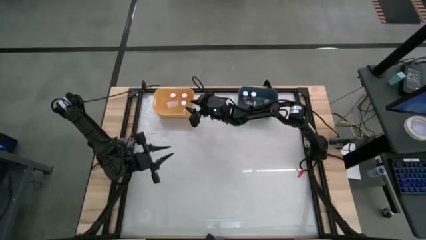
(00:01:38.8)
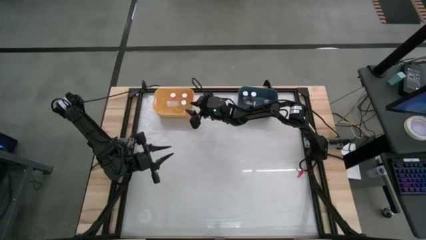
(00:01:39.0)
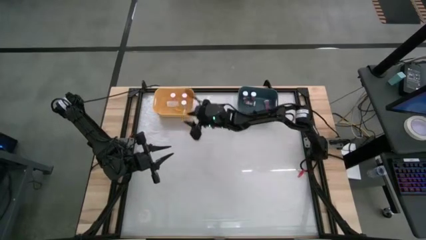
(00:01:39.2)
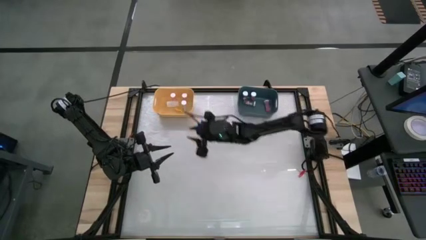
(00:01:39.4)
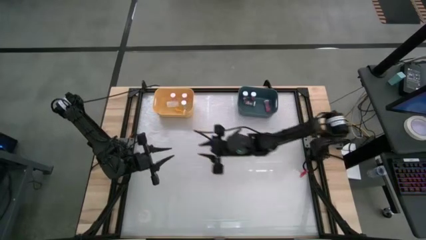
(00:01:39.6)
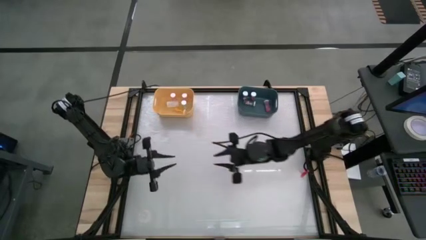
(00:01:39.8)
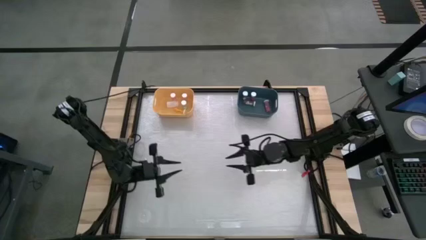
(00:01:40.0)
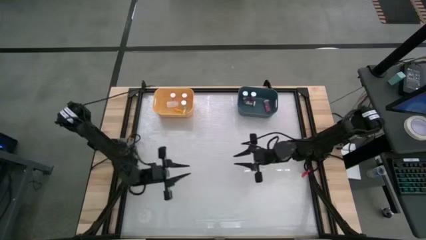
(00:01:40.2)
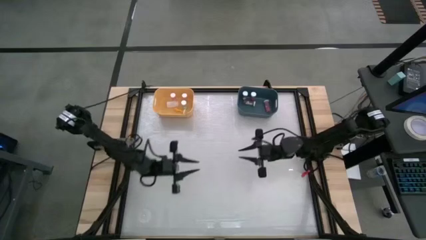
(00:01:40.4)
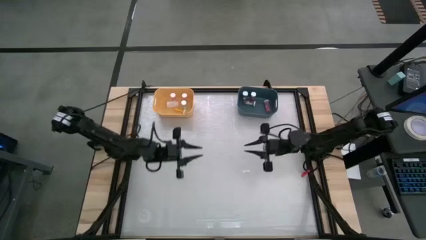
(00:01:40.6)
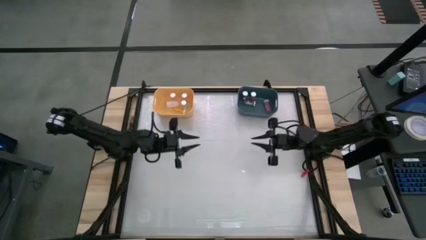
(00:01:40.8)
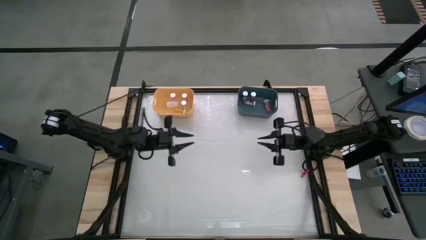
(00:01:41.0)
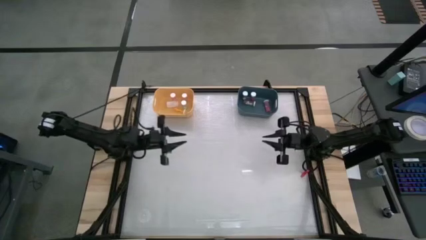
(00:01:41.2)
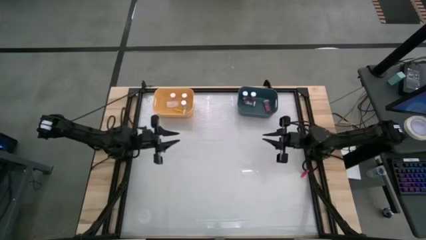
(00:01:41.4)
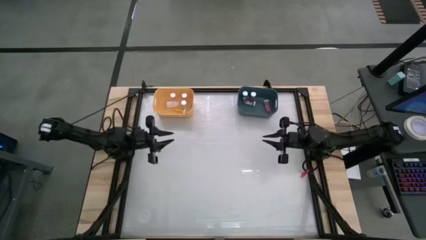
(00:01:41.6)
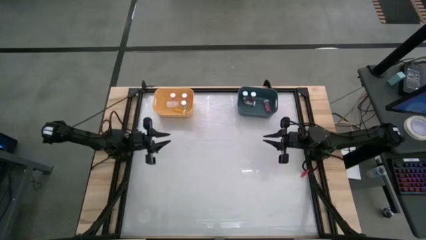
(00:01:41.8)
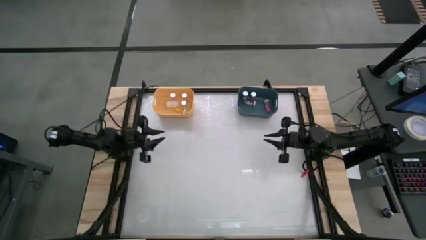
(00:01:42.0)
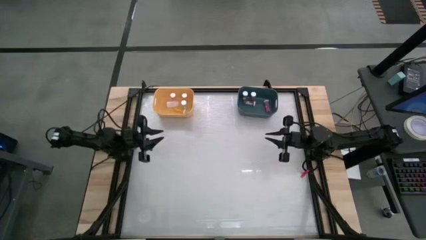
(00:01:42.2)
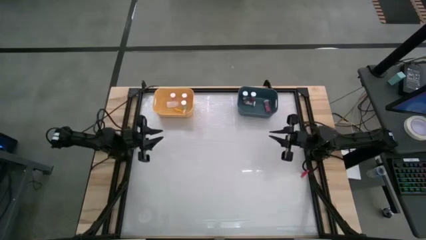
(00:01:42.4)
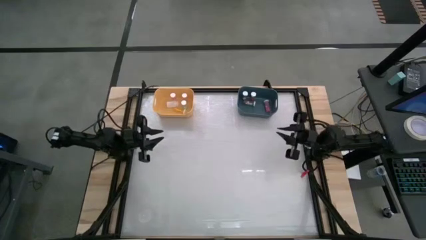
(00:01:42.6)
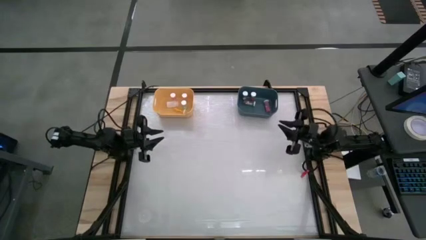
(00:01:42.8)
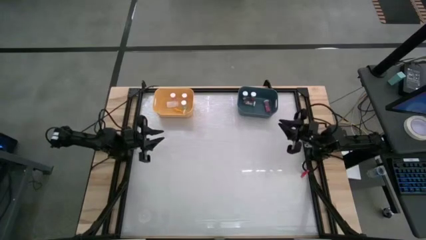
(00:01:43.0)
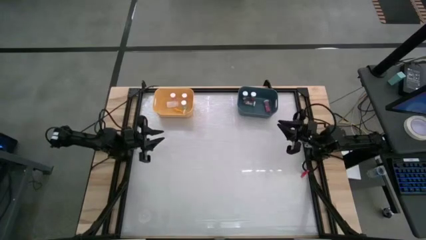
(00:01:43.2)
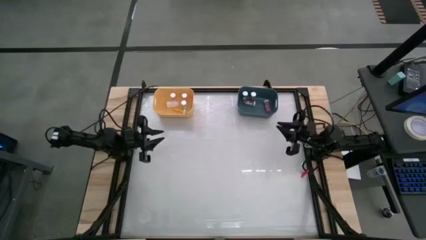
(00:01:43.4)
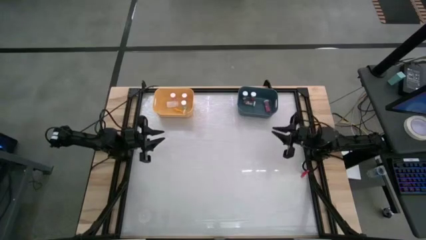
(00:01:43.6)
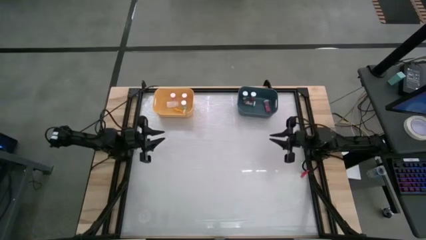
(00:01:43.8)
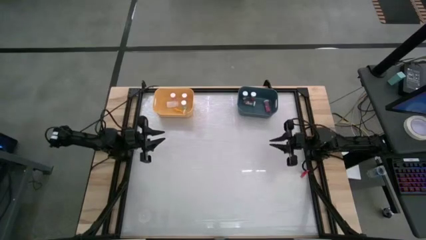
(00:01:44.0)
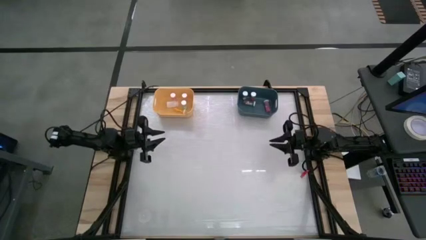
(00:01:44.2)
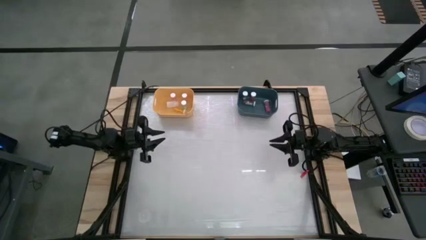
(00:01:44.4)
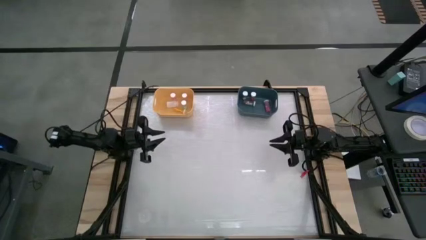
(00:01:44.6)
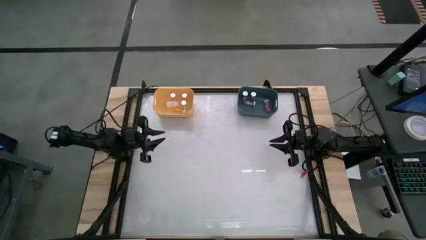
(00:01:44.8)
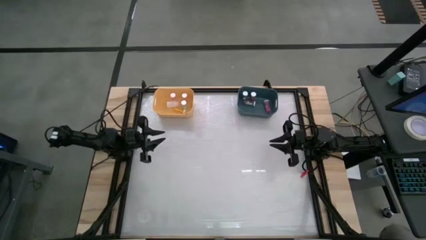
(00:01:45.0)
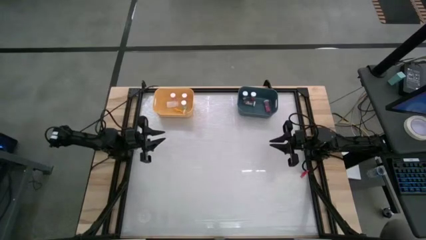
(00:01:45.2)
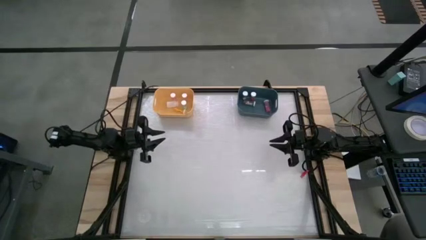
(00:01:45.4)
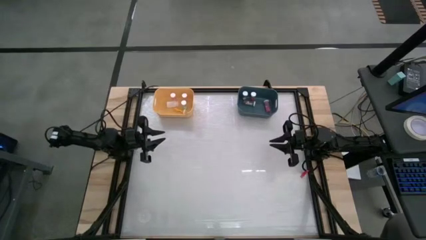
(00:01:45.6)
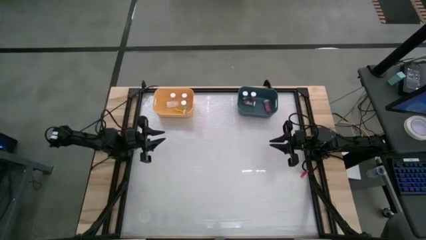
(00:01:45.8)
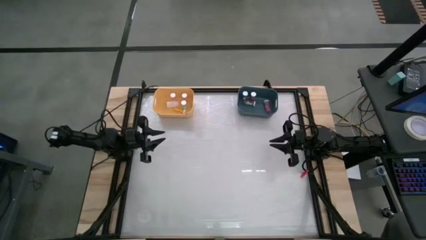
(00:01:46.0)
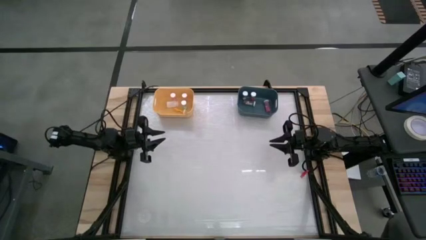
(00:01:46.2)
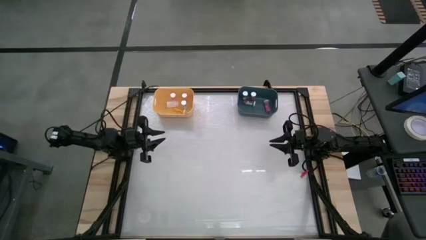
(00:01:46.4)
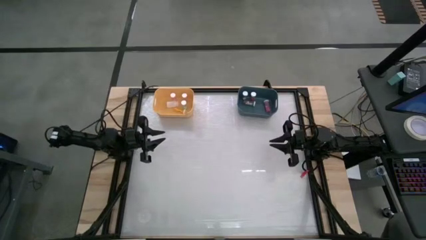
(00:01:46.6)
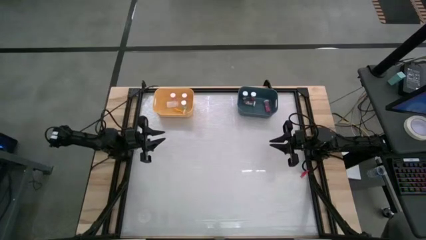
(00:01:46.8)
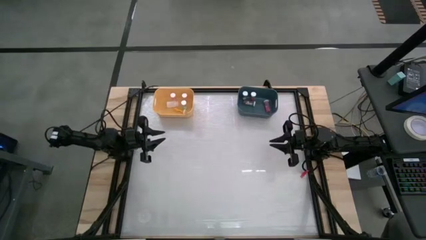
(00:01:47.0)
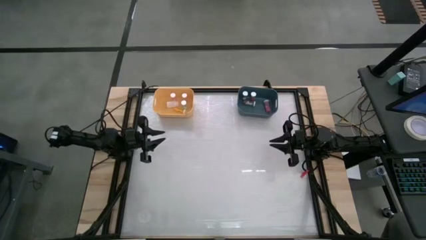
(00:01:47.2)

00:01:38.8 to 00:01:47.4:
Task: Pick and place medicine bottles into bin by pill shape (circle, oval)
Return to Home Position

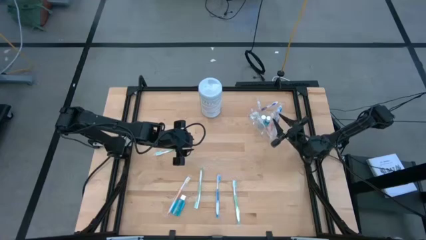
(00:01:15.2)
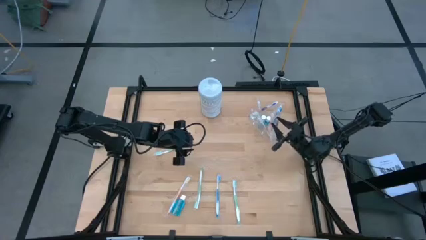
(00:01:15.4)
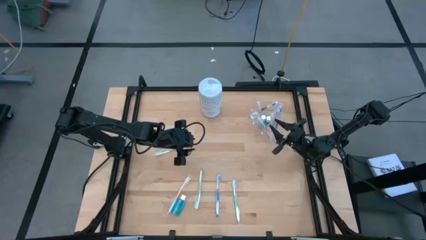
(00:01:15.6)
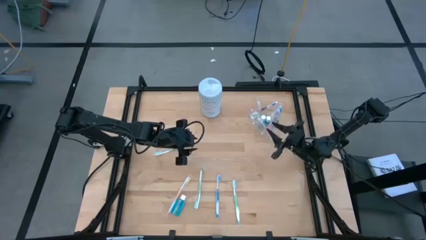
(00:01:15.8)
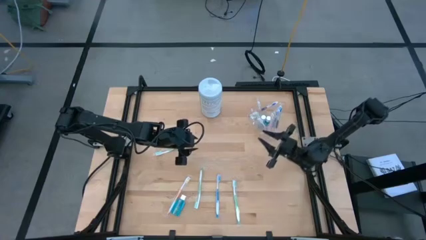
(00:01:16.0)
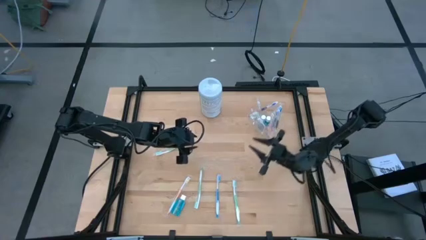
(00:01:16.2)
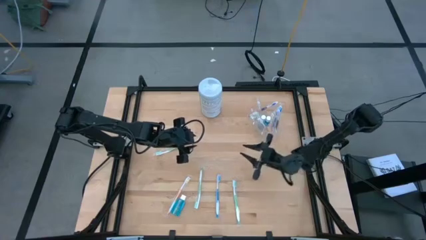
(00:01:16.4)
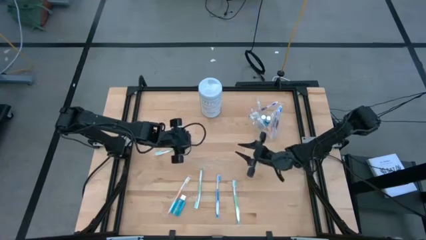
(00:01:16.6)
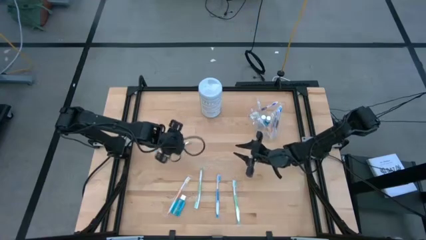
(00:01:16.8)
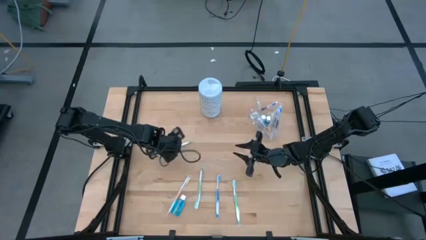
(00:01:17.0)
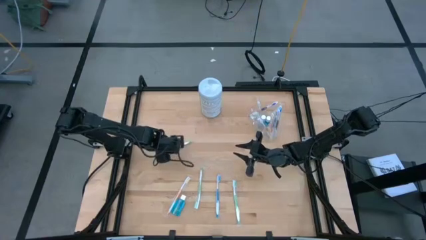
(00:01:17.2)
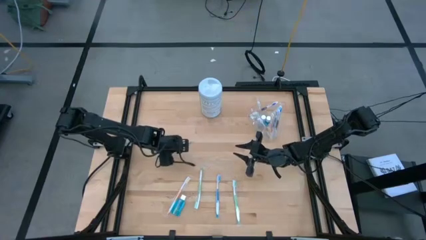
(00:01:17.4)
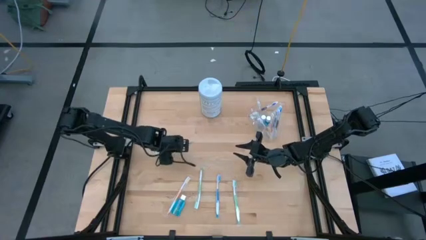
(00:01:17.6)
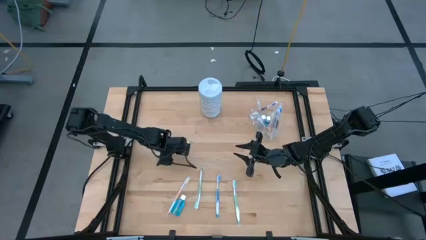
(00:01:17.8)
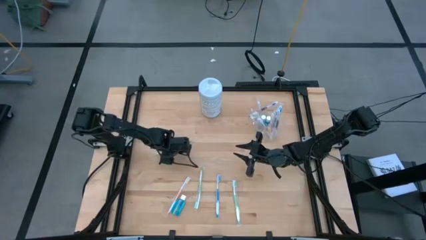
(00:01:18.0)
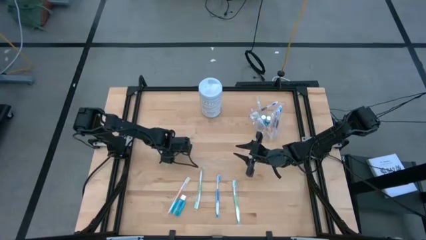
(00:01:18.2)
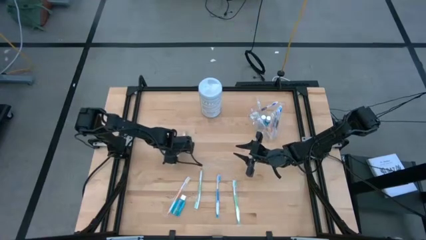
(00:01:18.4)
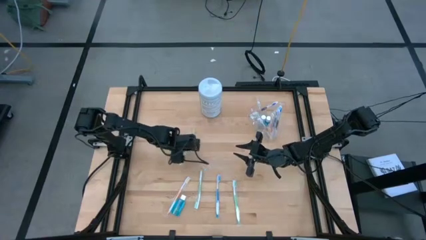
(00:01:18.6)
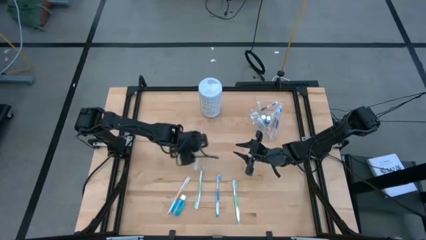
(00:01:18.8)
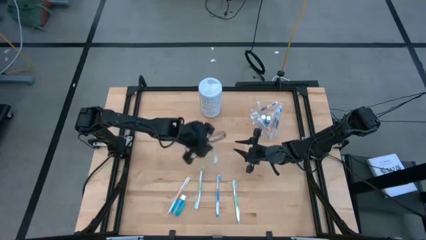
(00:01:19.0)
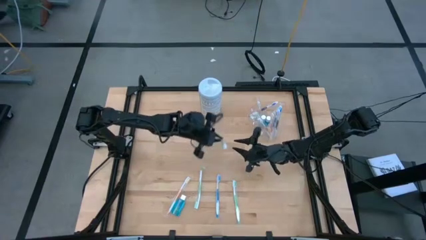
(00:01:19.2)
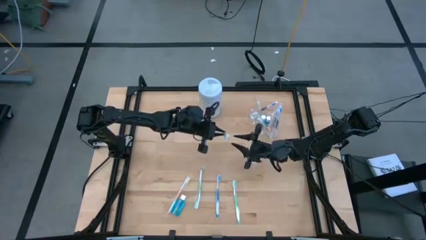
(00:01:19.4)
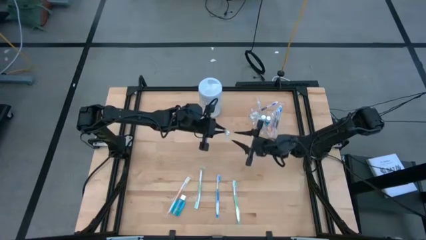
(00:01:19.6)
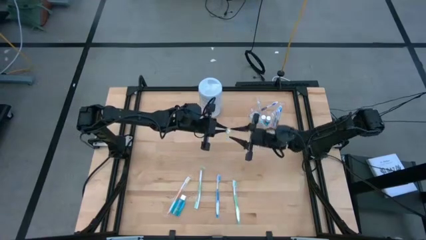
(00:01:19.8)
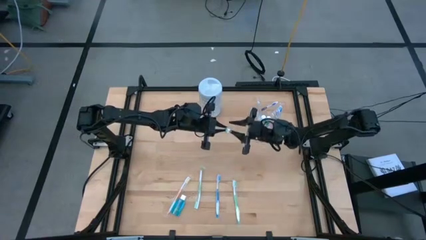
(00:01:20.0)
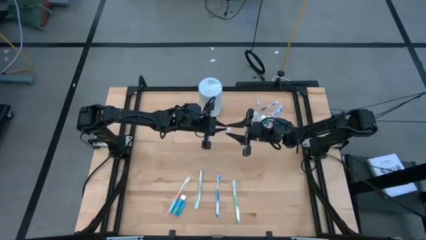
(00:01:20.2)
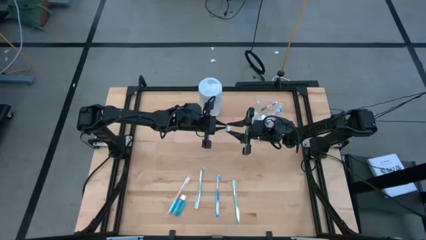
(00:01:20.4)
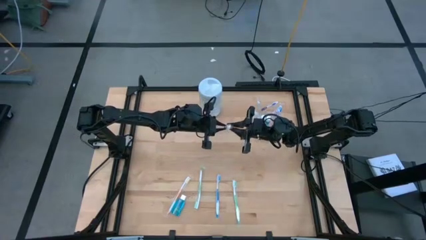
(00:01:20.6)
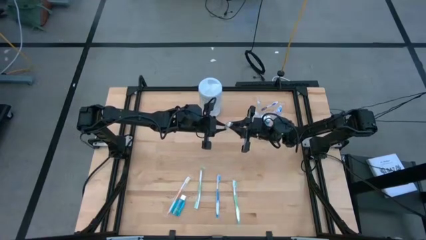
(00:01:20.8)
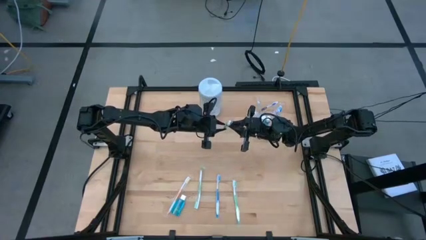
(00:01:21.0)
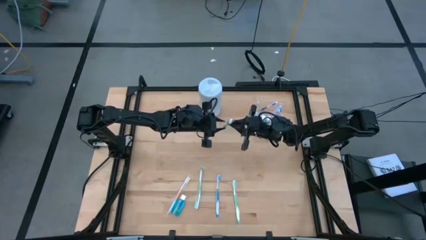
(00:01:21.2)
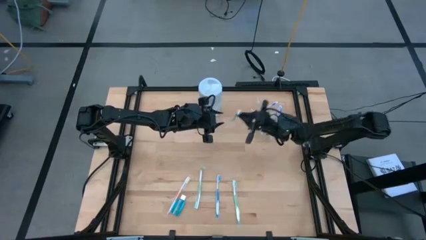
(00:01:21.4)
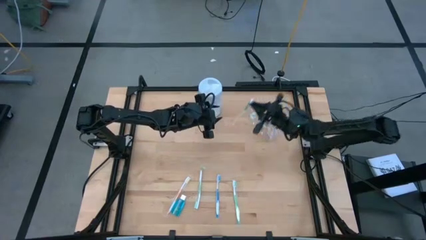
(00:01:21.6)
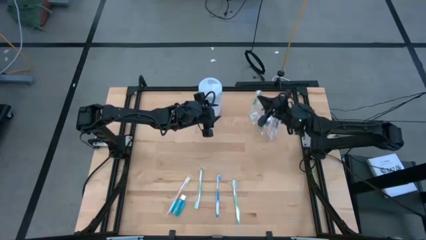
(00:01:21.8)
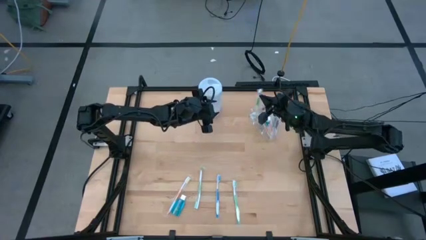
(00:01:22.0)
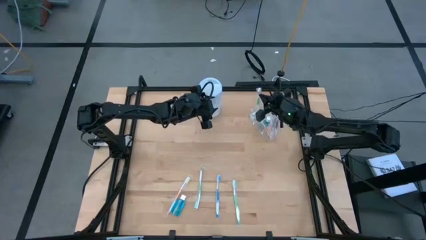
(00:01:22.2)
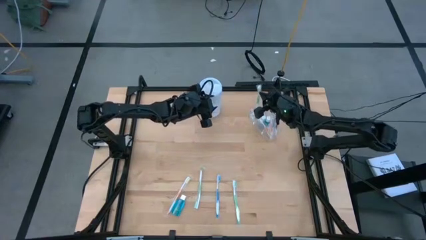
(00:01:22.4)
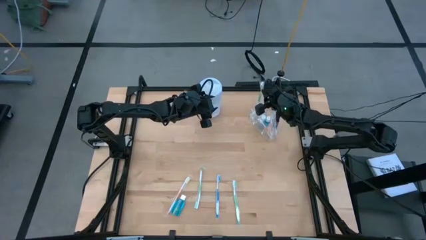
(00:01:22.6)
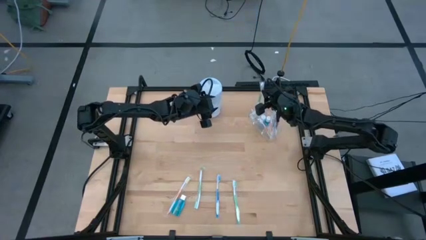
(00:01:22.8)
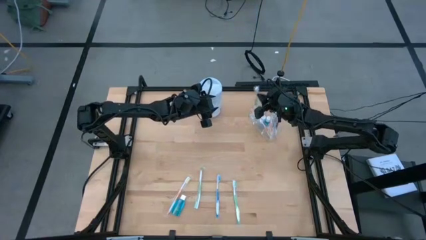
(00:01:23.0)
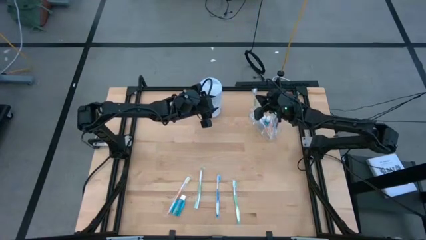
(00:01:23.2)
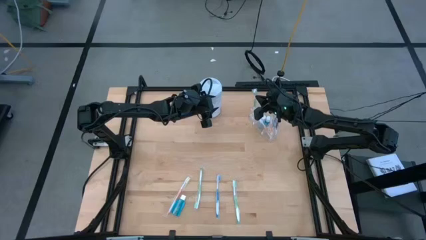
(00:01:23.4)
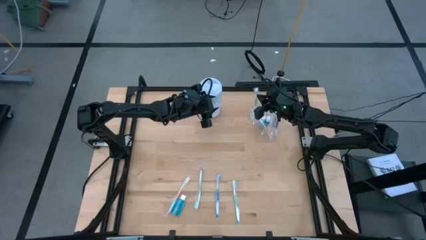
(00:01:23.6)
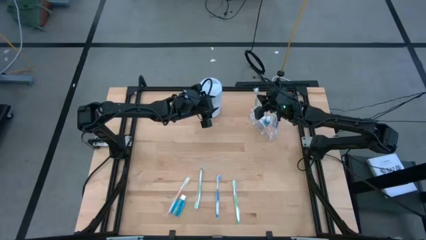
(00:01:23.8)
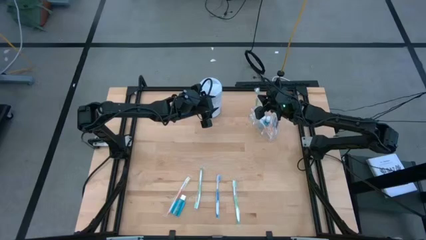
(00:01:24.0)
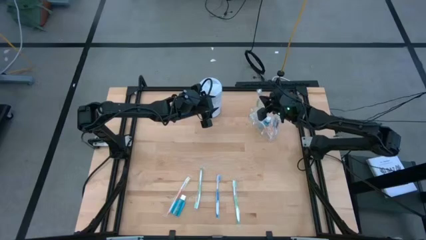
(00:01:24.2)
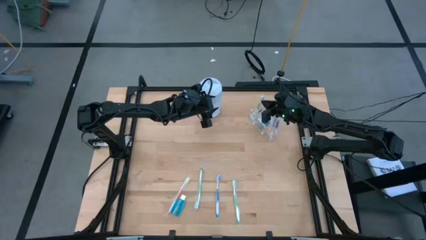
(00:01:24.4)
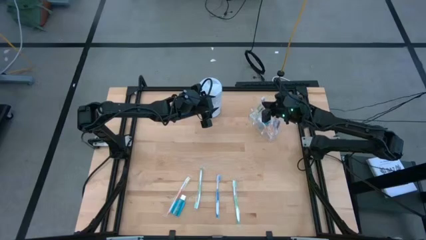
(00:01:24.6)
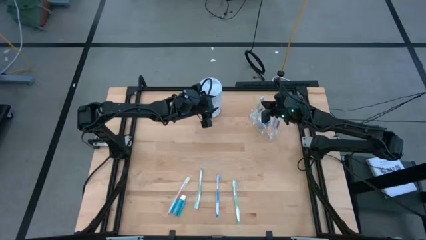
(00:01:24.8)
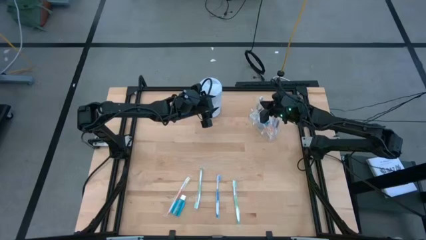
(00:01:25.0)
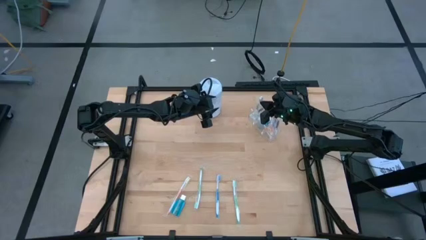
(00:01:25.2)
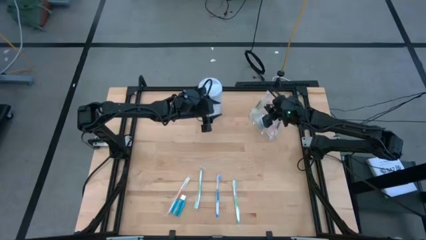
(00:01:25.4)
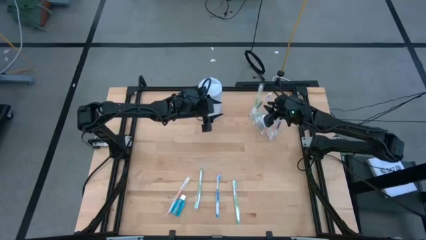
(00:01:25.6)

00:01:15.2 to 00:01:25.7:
Task: Pick & Place toothbrushing station
Put the green toothbrush into the transparent organizer
